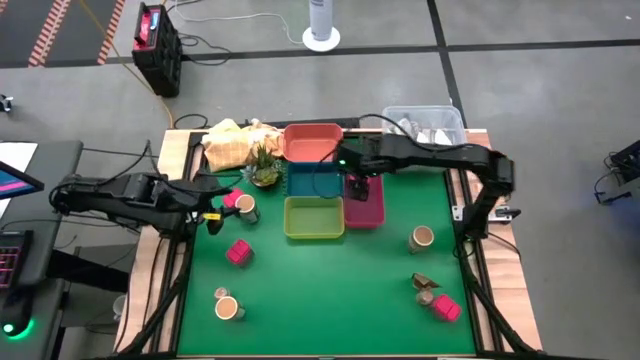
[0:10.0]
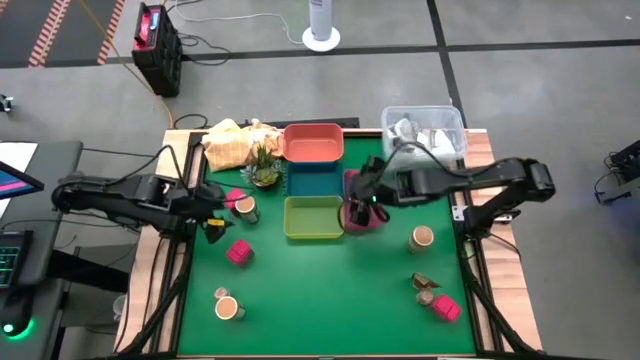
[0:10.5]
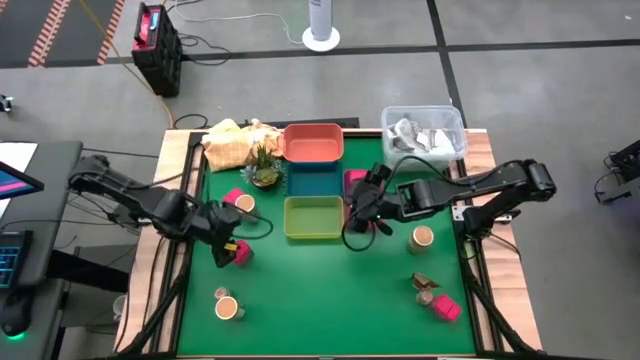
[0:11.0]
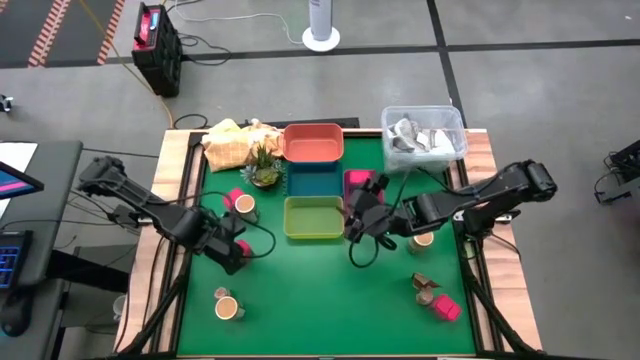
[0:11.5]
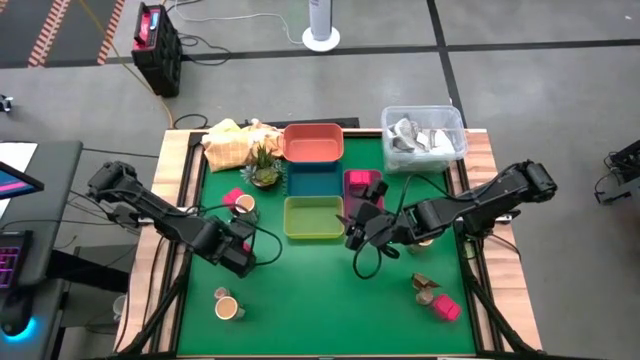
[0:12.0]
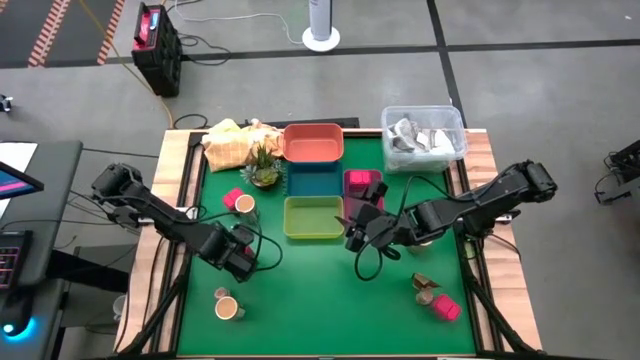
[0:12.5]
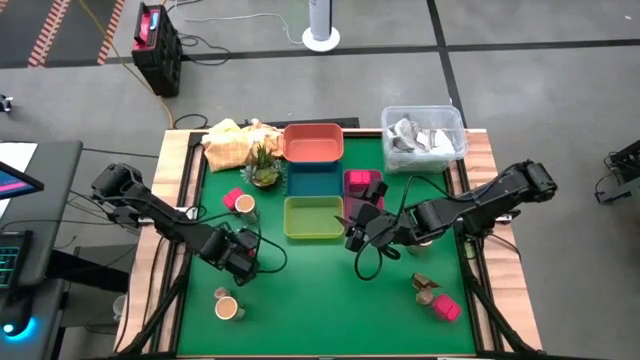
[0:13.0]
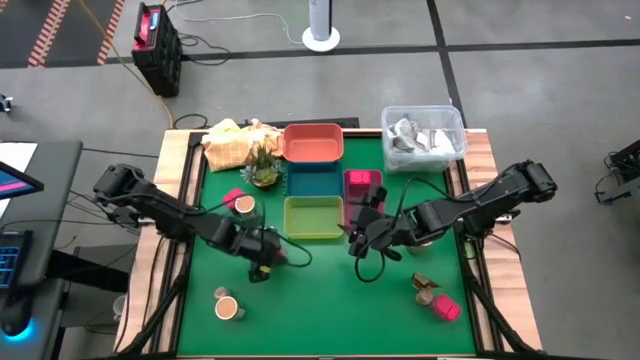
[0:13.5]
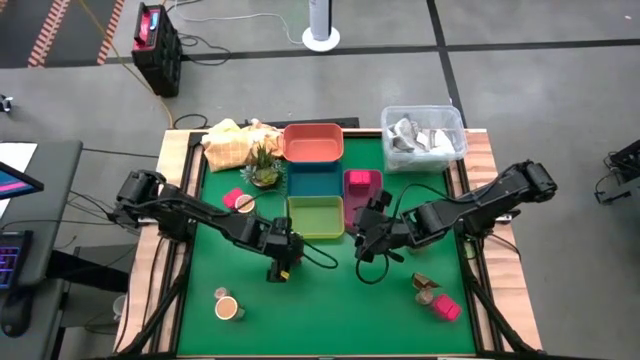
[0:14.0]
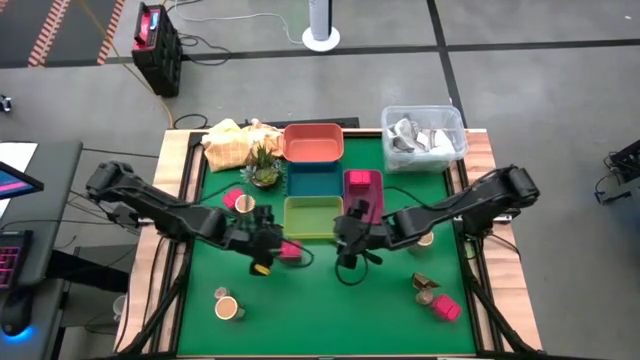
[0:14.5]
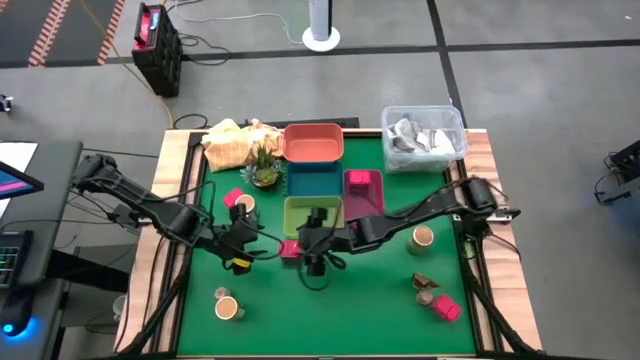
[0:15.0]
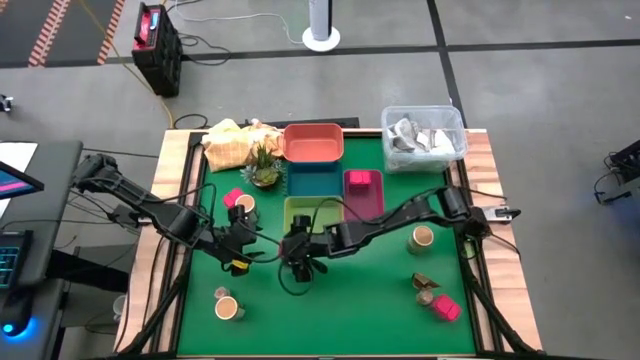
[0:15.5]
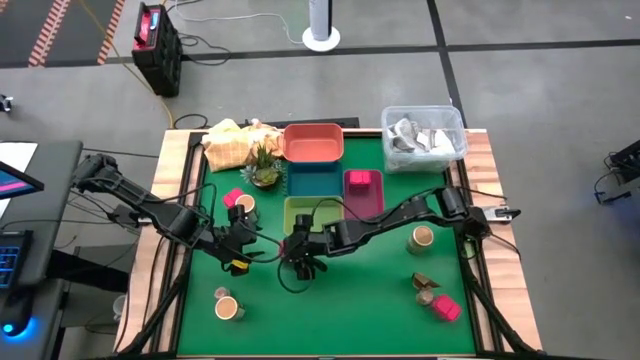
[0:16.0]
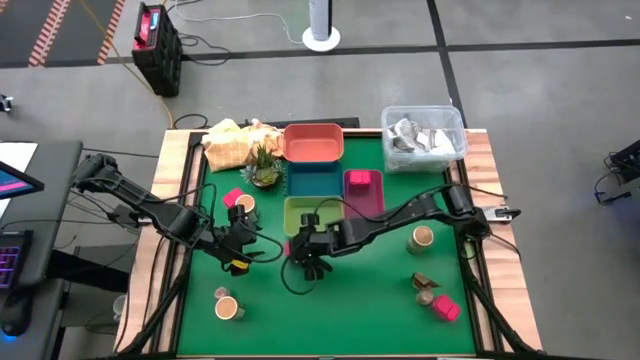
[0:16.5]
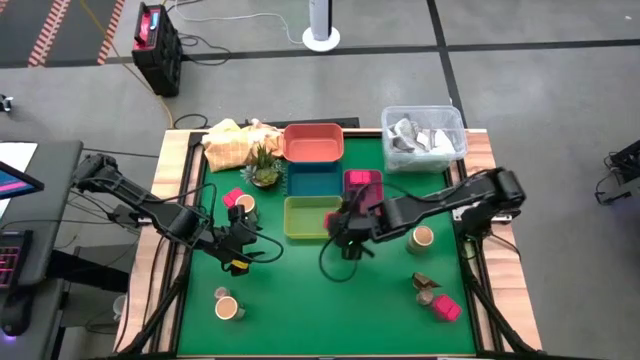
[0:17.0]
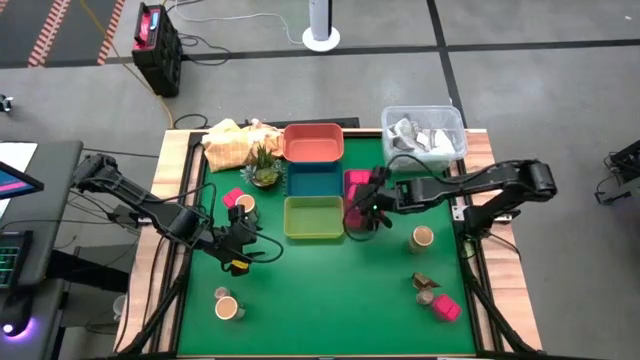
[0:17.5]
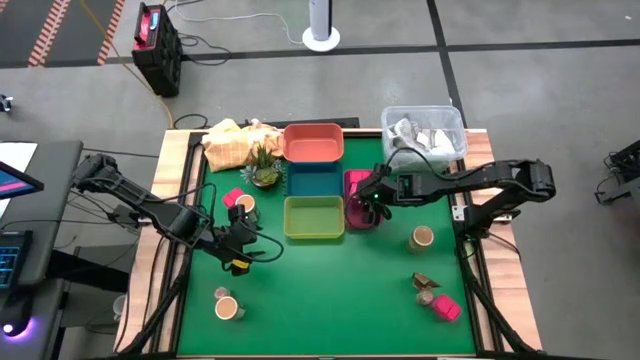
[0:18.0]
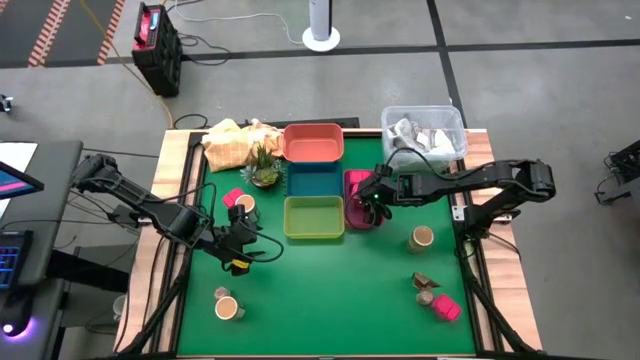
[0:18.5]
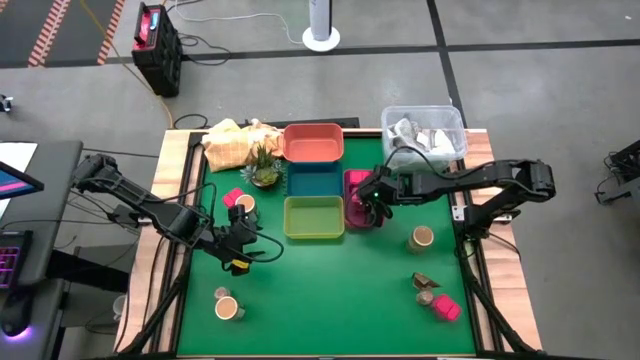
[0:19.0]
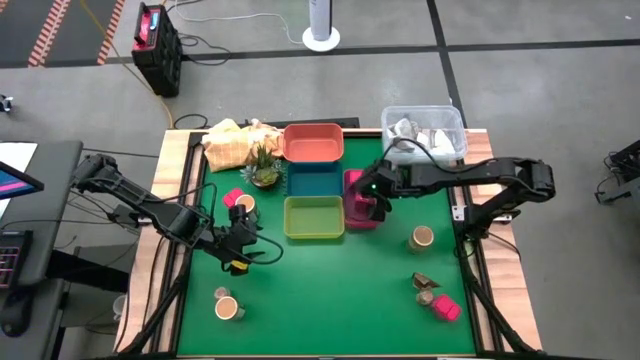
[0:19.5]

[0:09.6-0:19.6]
Task: Sort spices by type
Put the middle left red seasoning can into the red bin

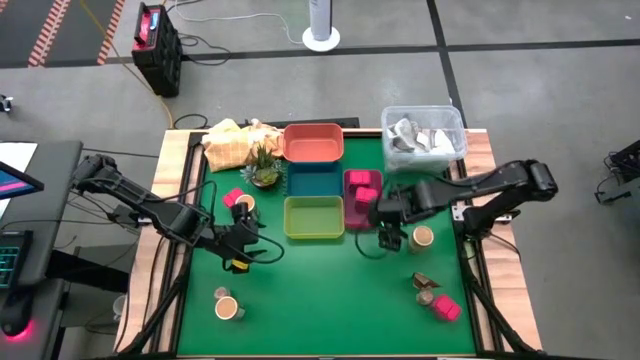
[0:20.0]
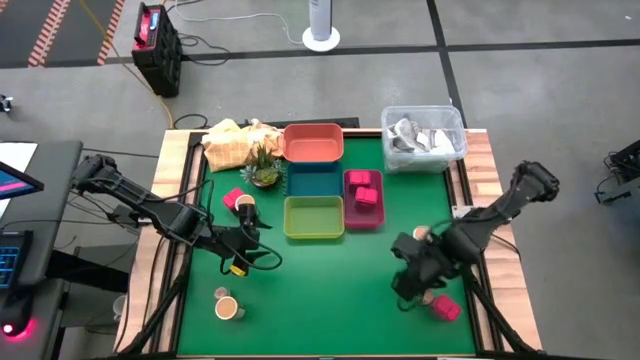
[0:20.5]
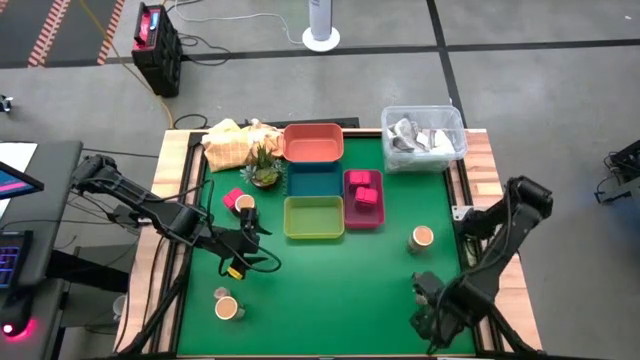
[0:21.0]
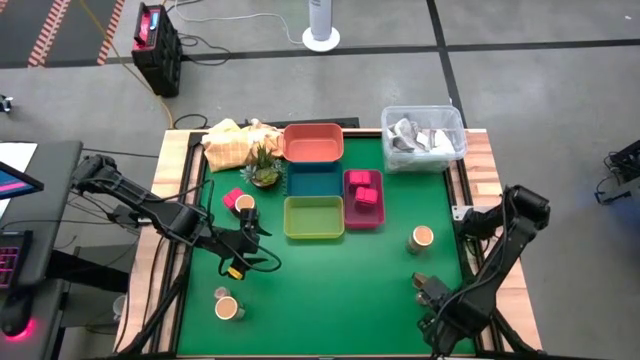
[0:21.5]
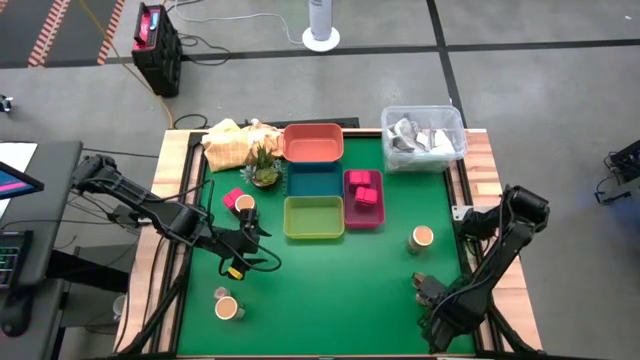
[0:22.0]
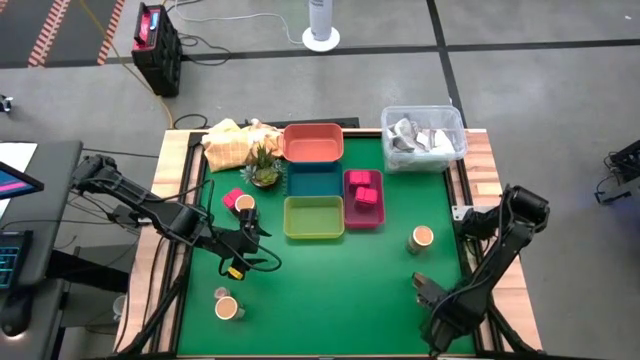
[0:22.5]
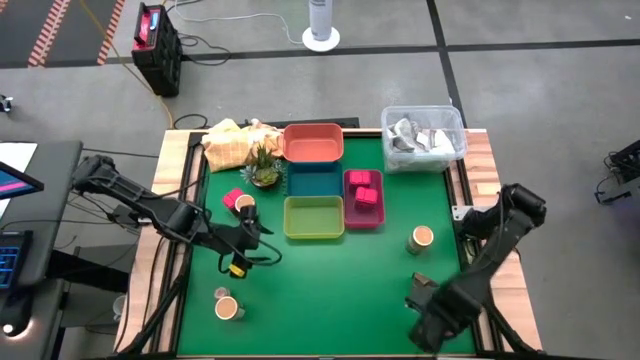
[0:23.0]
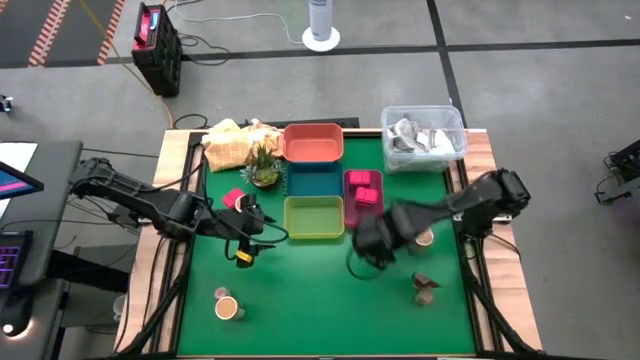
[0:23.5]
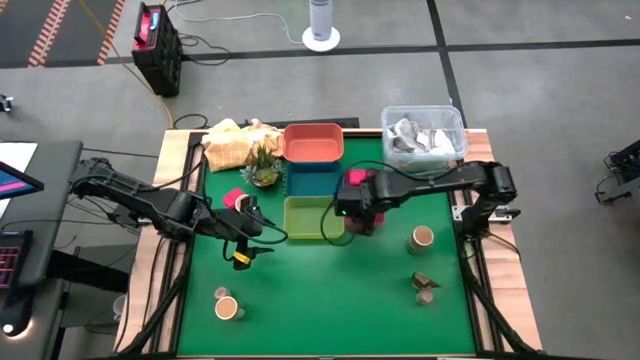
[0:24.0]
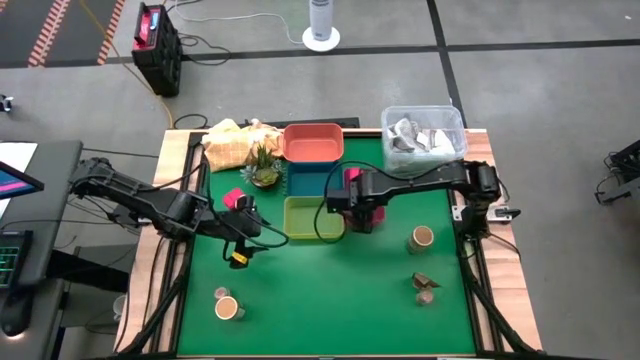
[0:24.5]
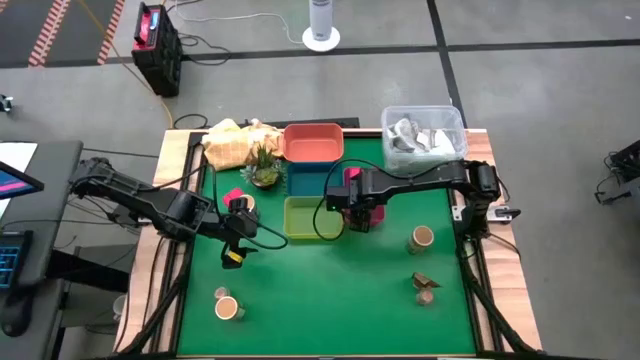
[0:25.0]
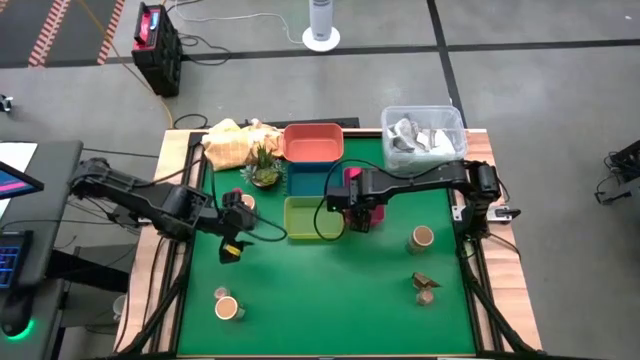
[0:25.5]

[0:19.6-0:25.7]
Put the bottom red seasoning can into the red bin
